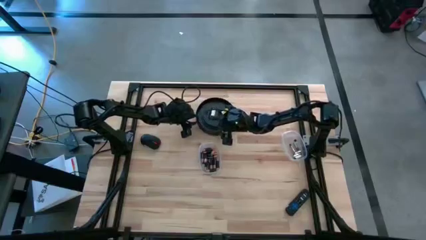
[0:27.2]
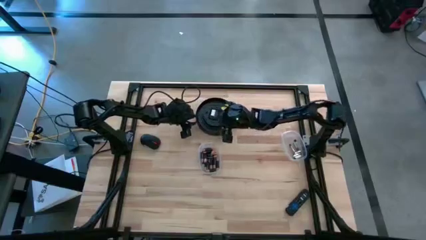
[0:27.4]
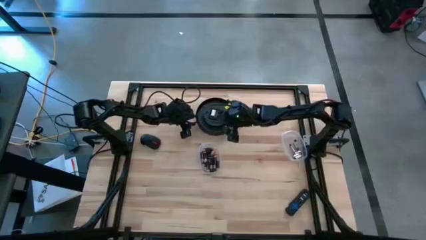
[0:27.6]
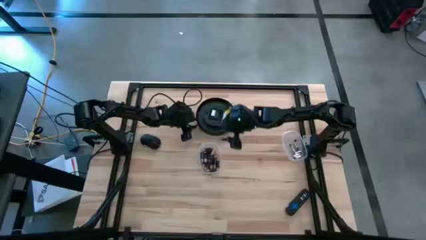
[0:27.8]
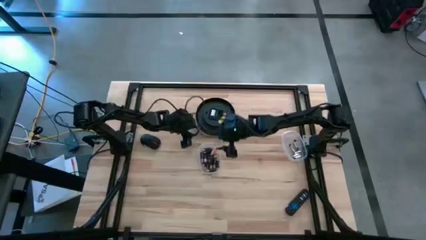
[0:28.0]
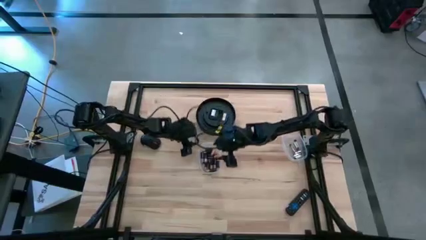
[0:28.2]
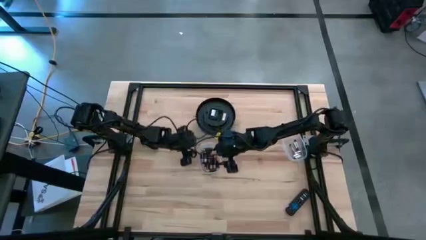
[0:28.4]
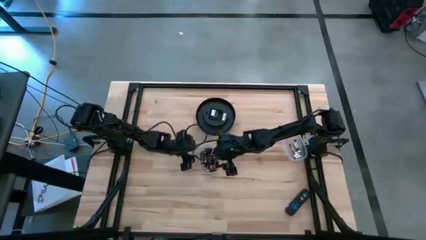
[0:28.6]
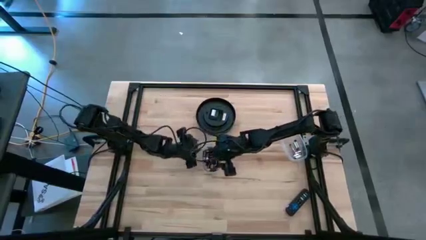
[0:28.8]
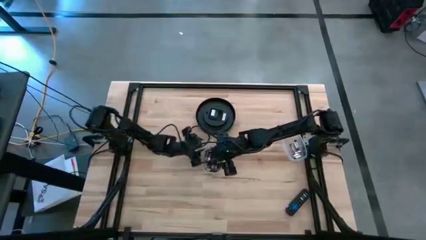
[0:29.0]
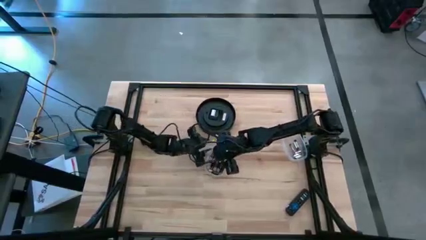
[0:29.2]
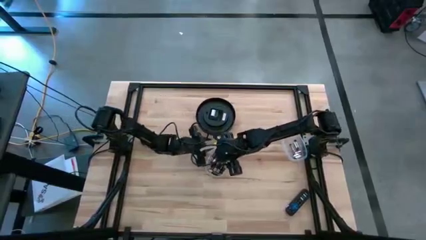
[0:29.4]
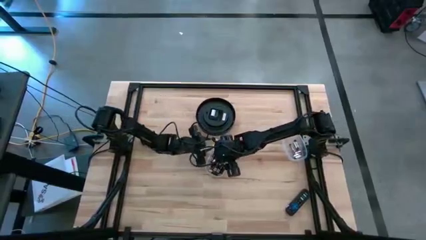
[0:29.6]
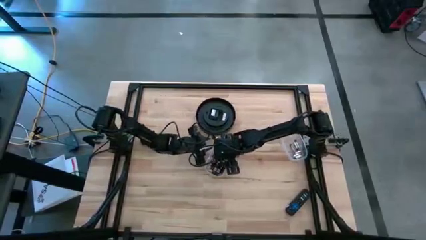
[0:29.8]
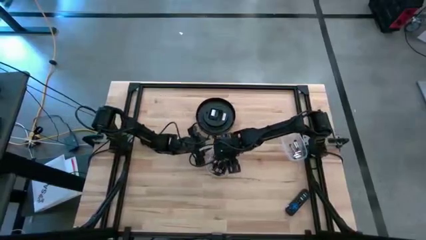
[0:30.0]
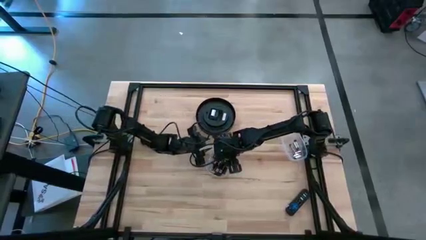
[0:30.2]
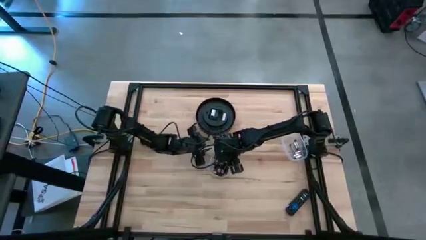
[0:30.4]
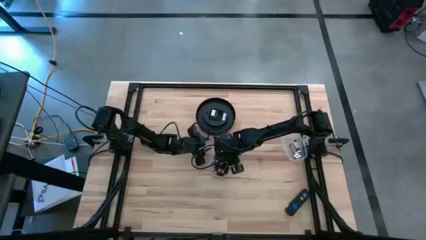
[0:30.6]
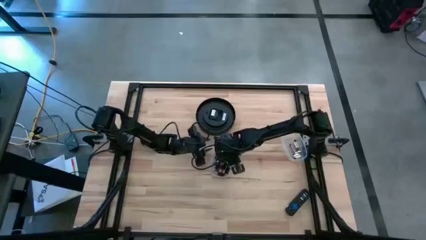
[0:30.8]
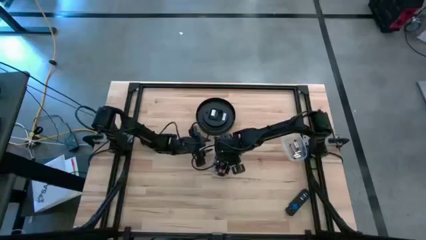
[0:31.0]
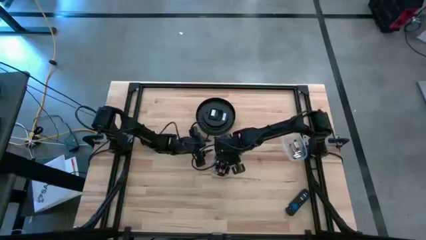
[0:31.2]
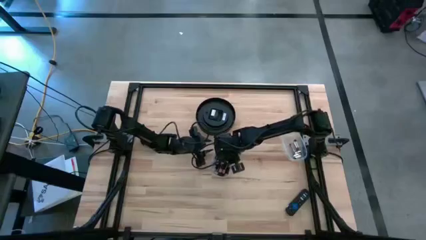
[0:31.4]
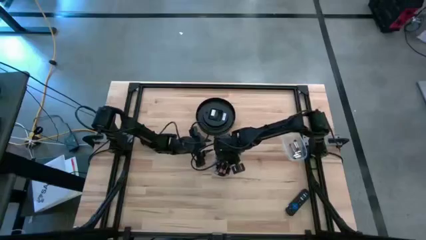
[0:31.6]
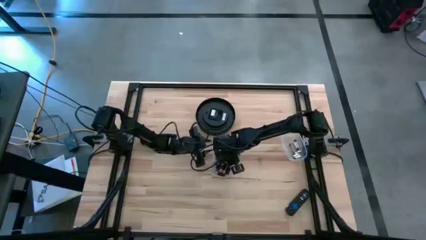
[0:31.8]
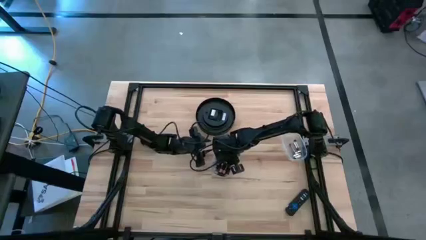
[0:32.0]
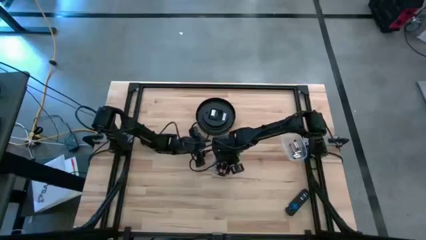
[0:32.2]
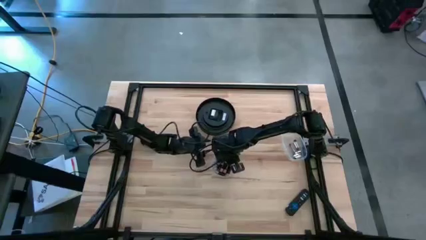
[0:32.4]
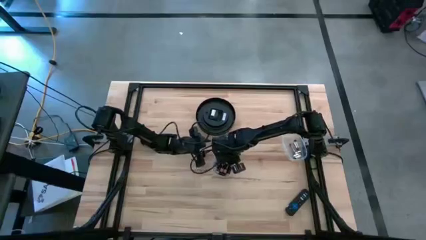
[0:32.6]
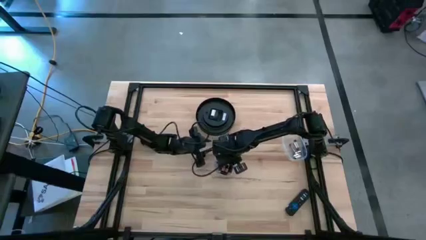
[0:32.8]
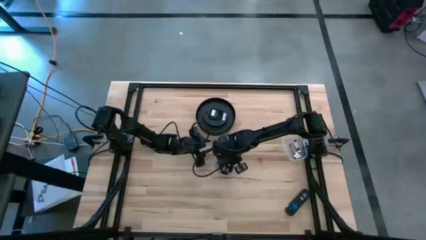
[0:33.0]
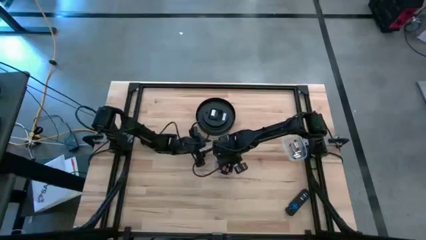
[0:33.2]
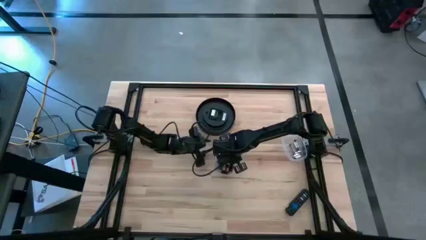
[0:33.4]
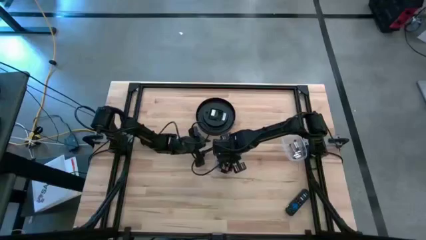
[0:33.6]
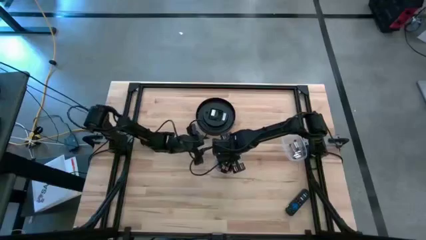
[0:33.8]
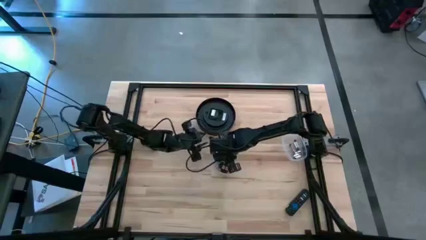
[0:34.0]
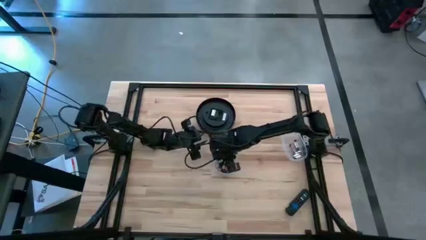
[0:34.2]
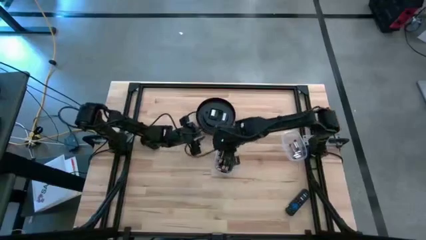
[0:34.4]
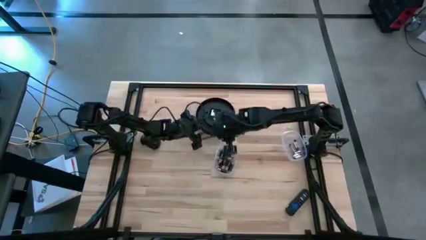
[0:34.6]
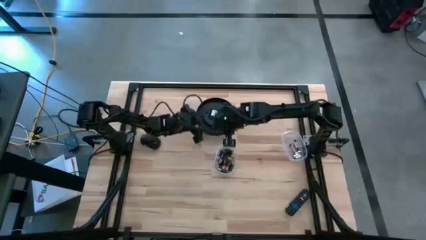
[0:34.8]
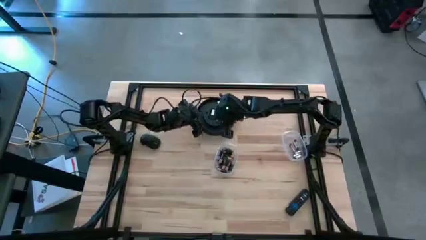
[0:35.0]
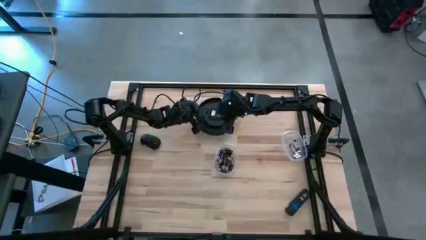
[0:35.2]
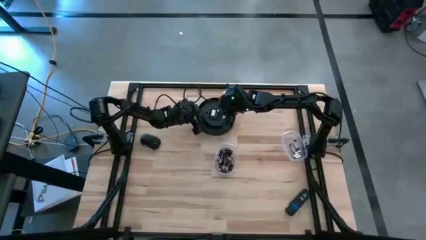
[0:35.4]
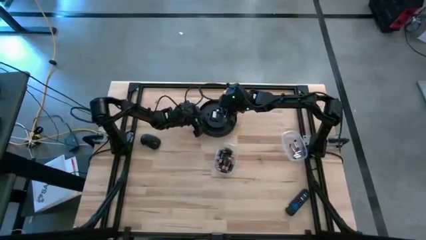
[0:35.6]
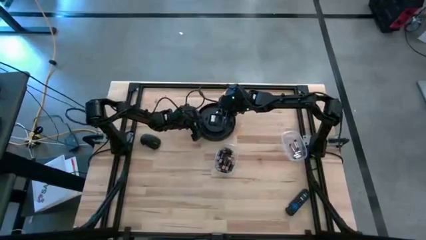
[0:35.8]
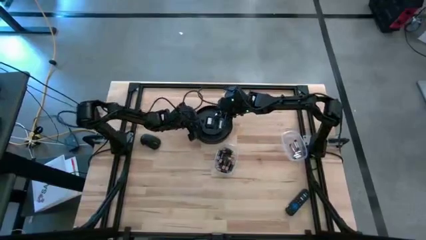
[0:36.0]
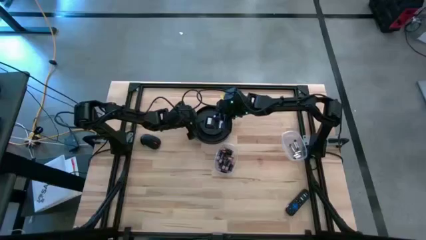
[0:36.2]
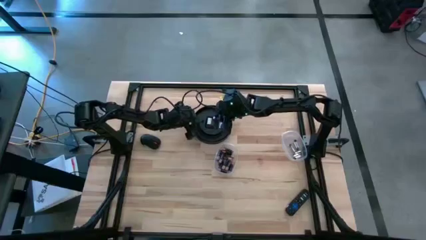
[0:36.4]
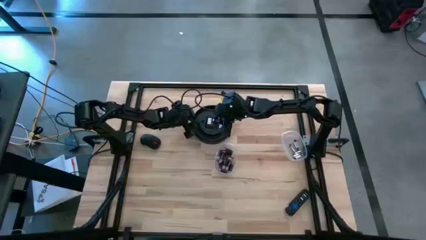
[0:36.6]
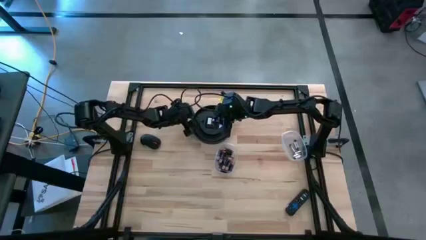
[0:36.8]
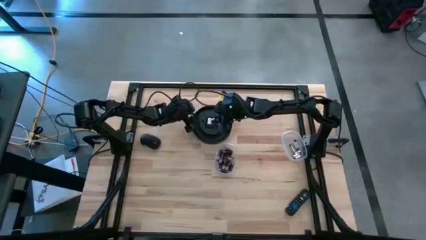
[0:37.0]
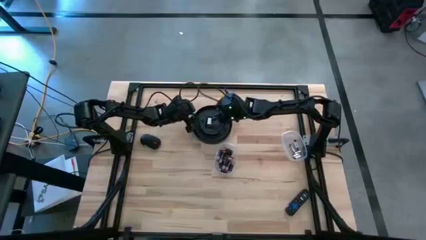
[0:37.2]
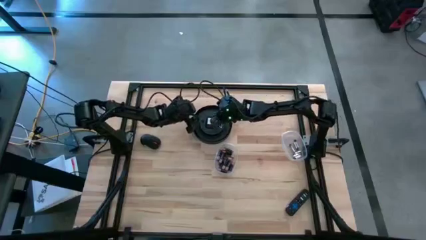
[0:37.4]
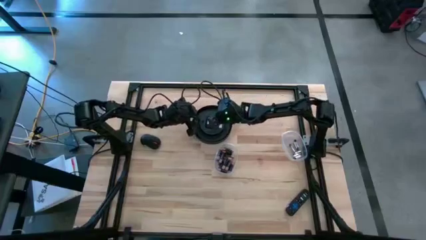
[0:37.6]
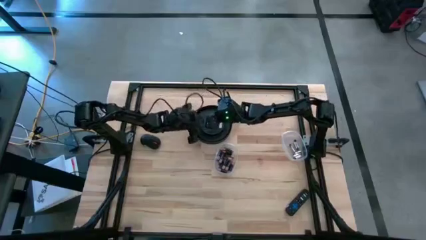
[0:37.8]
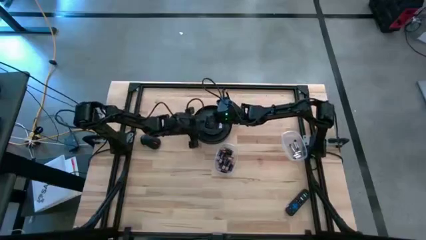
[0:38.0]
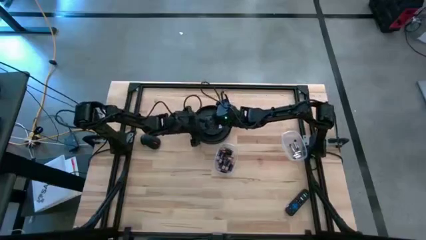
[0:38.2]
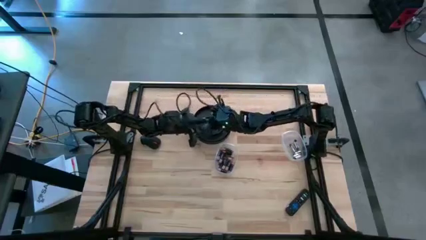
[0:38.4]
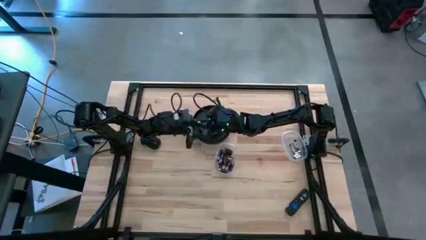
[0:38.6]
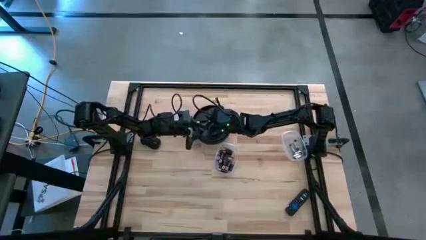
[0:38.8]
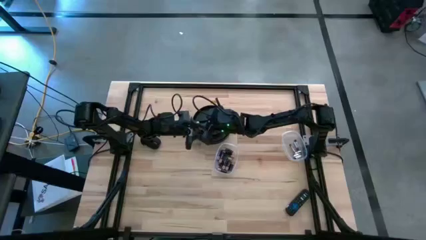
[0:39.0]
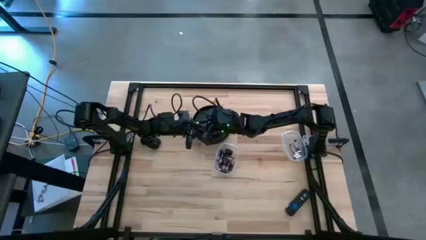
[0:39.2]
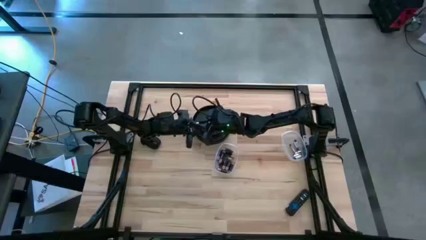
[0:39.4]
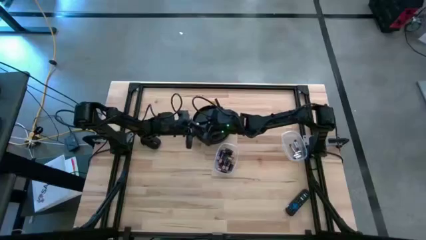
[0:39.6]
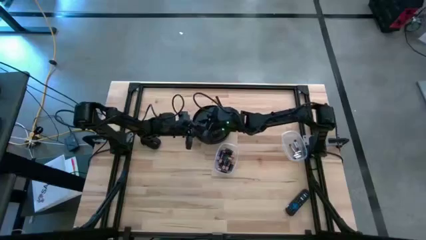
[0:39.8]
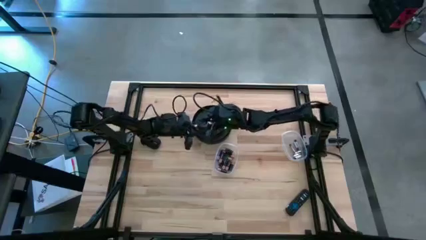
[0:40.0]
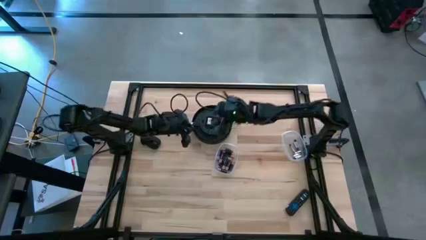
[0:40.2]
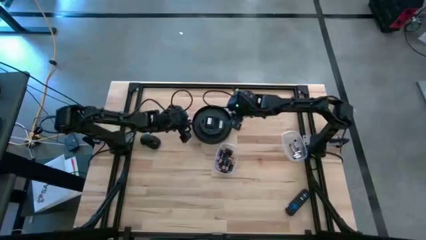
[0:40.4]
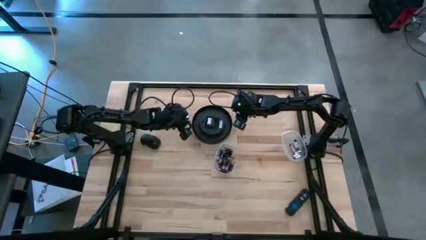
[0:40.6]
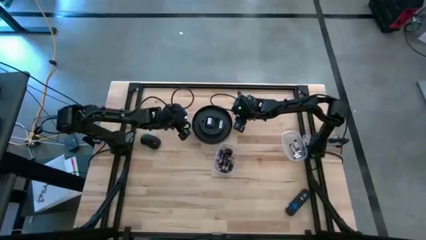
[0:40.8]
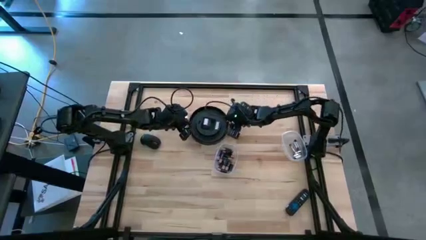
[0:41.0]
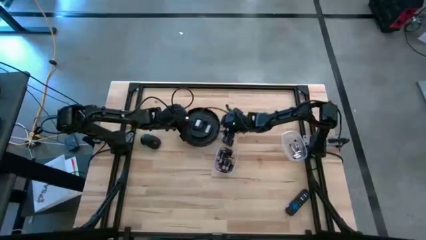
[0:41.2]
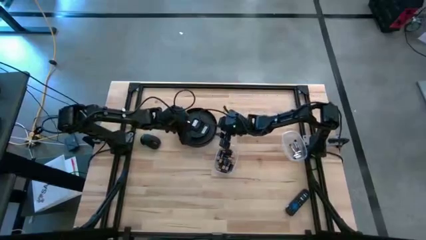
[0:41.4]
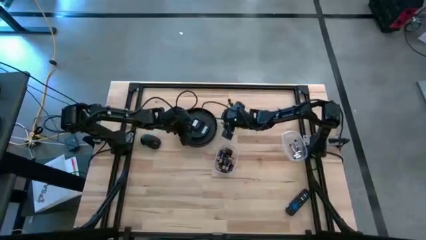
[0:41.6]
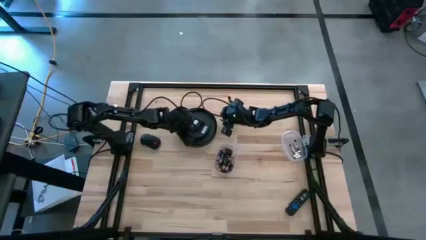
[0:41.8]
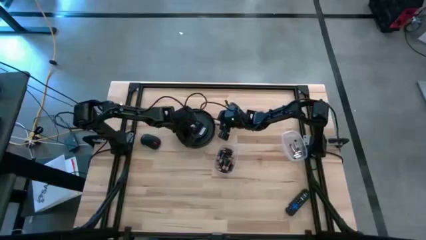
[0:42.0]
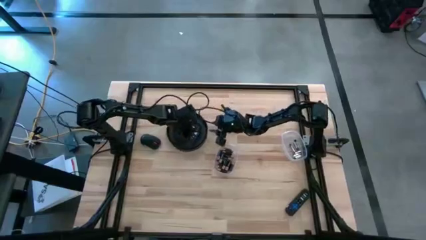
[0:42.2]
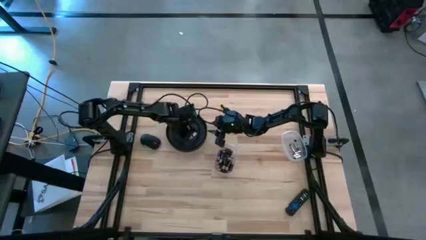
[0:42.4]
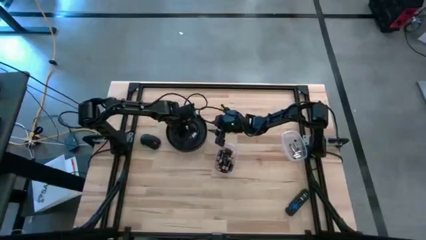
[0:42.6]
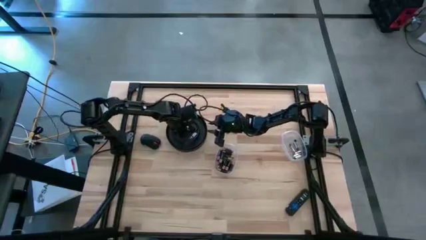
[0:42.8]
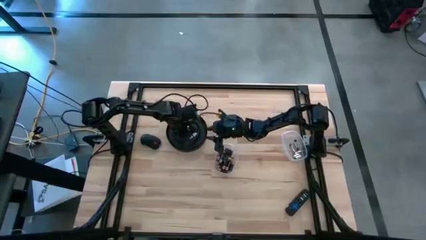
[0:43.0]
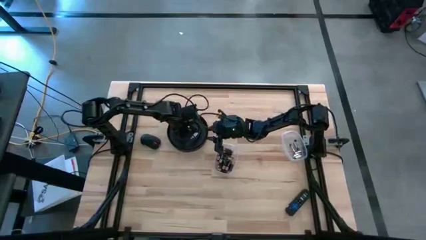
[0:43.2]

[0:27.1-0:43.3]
Task: Insert battery
Insert the orange battery into the wall clock battery compartment
